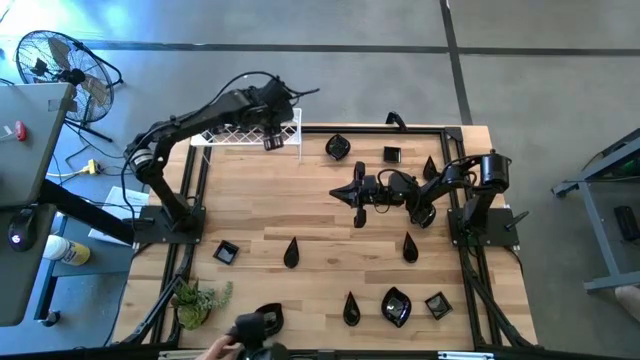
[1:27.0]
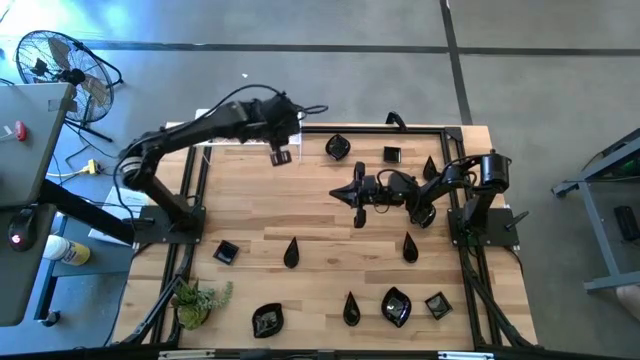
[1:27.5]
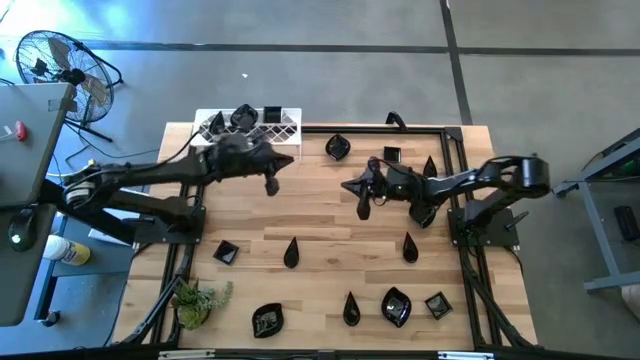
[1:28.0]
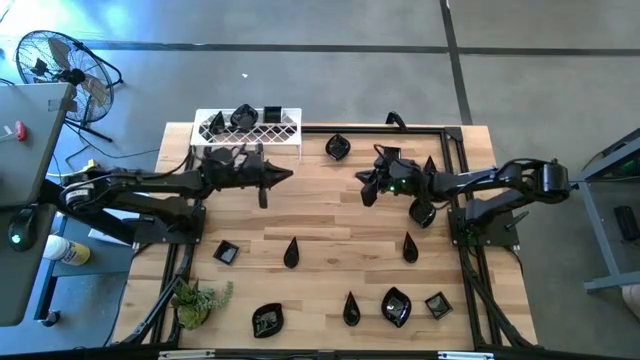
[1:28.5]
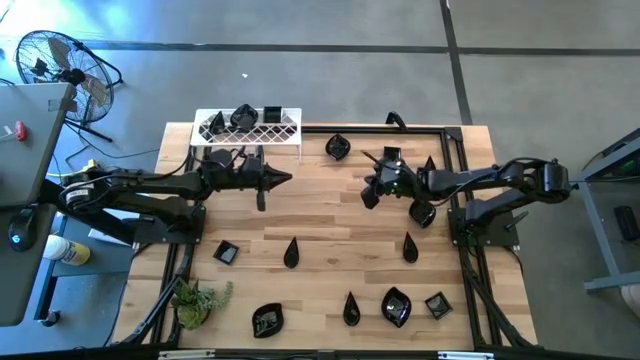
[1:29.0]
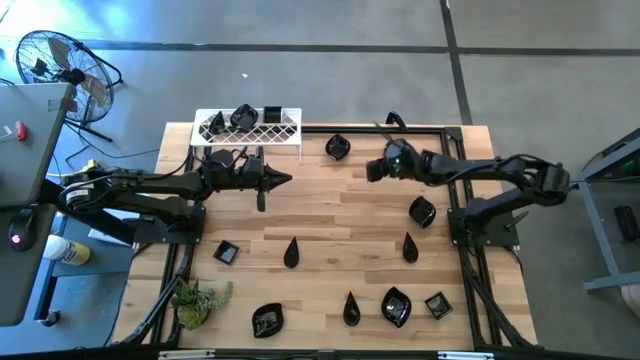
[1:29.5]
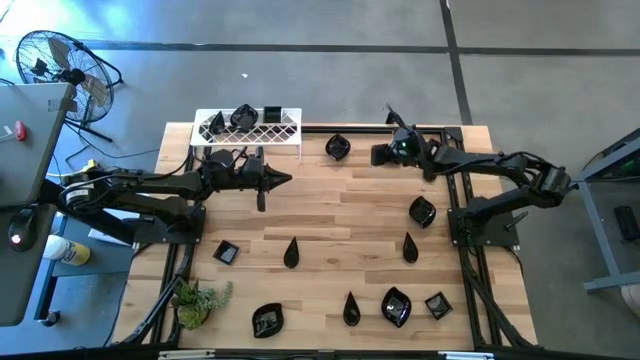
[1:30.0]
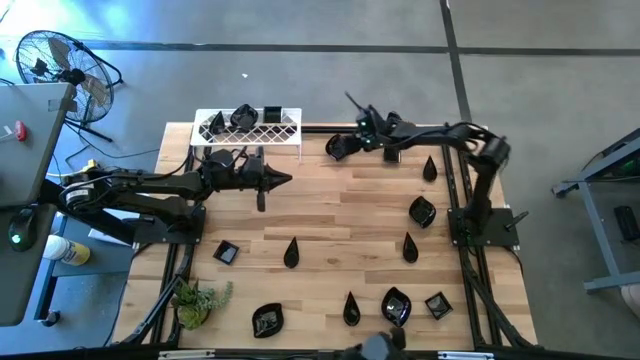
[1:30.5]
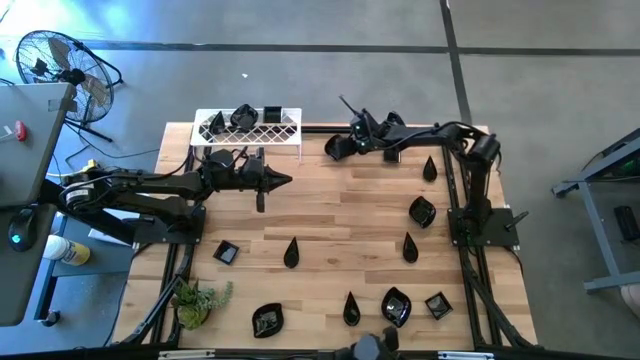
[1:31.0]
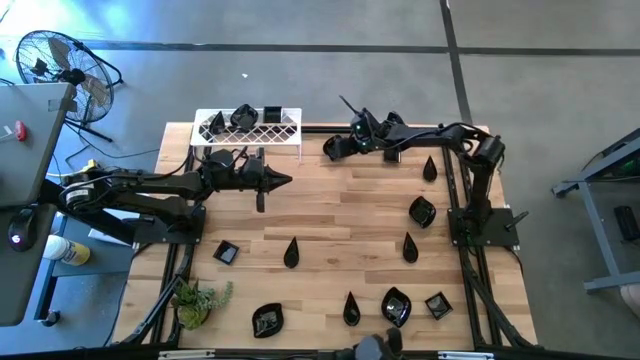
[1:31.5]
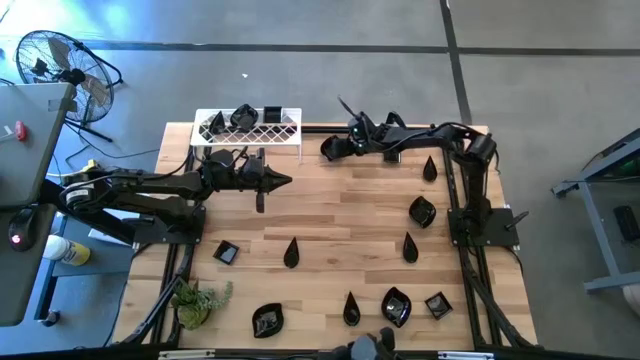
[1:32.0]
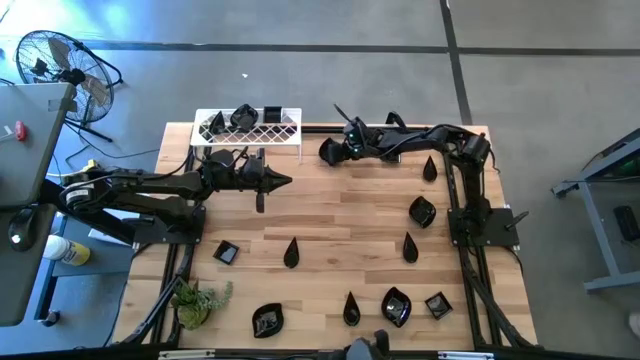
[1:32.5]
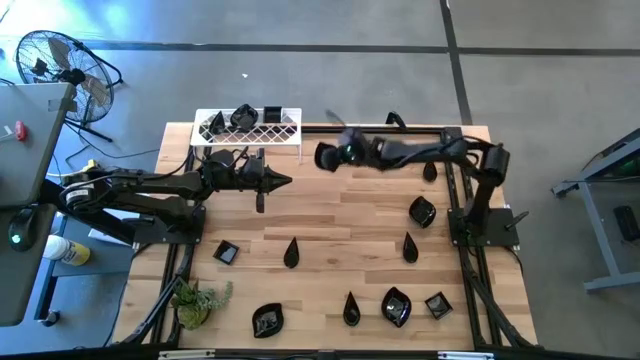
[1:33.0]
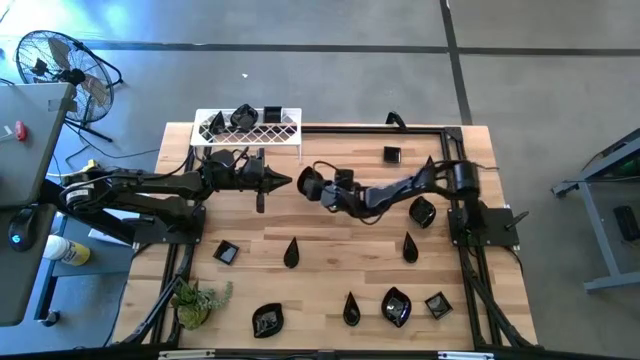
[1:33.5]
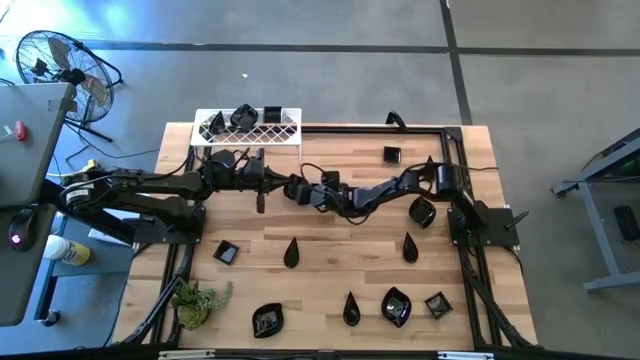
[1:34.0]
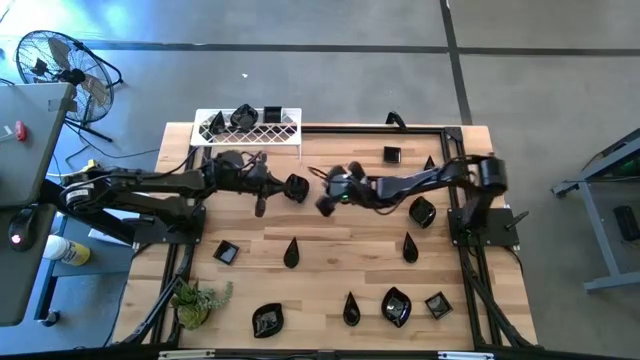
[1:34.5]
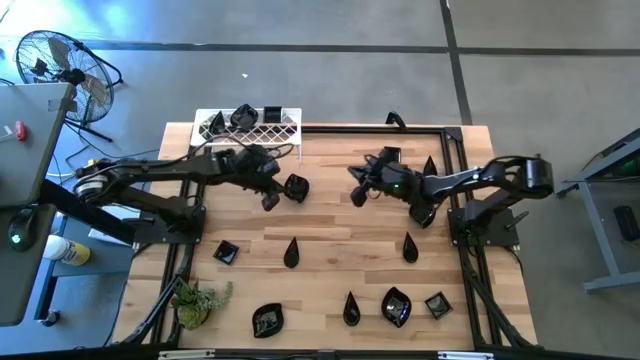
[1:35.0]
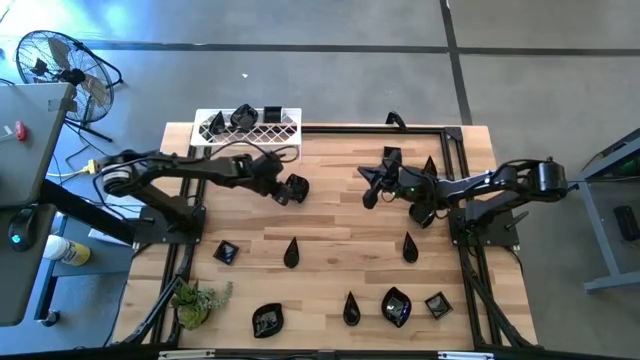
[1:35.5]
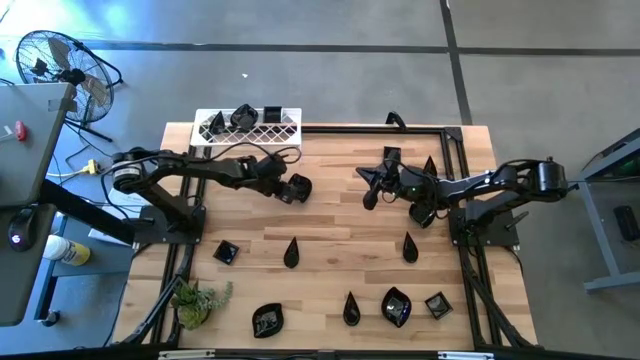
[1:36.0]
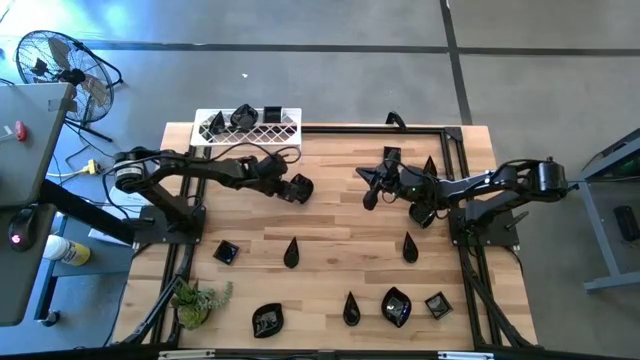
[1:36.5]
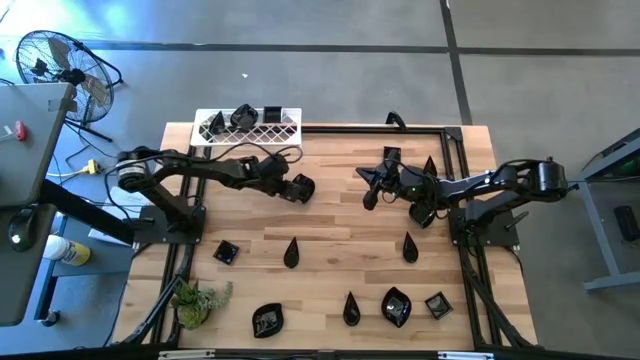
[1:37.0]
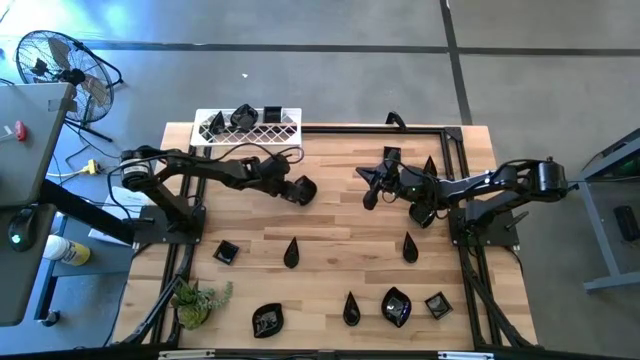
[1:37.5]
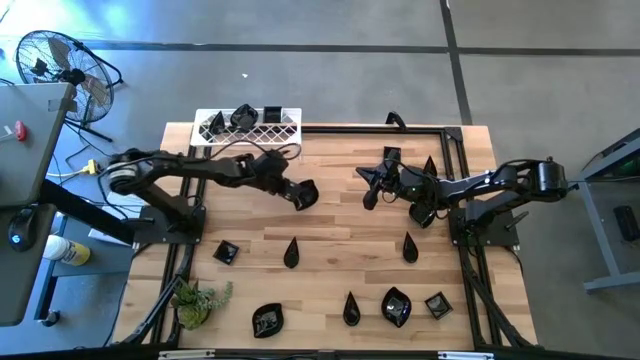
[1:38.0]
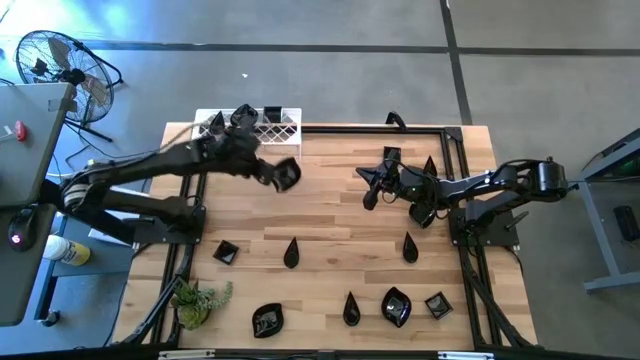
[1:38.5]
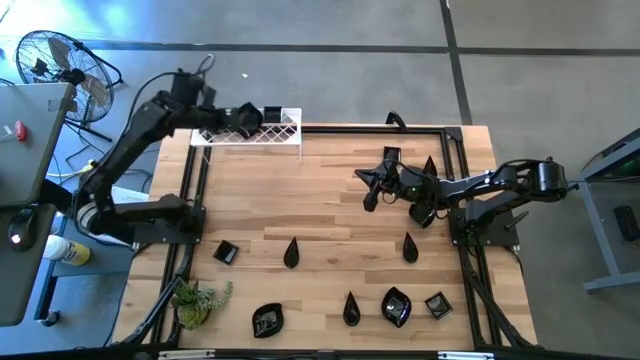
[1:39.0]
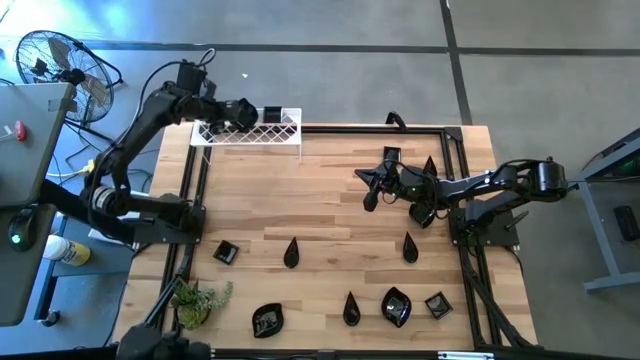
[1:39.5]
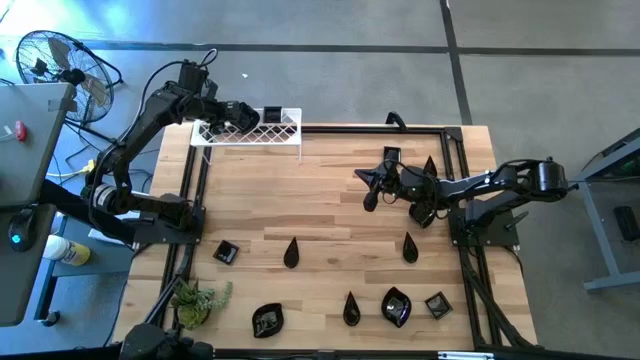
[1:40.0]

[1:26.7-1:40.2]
Task: Pick & Place Mini shaped plates
Stack the leaf-shaped plate on top of the leaf-shaped plate on the shelf

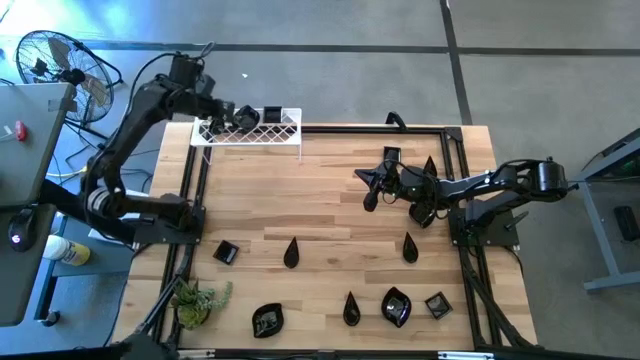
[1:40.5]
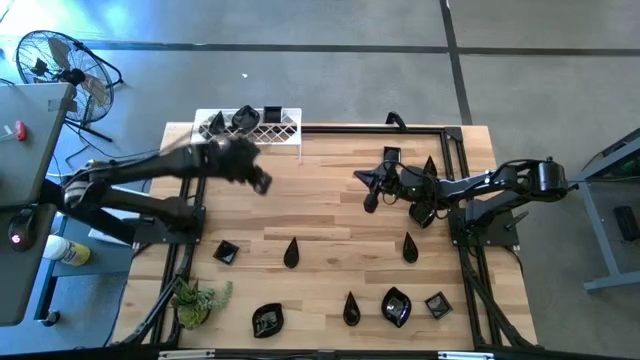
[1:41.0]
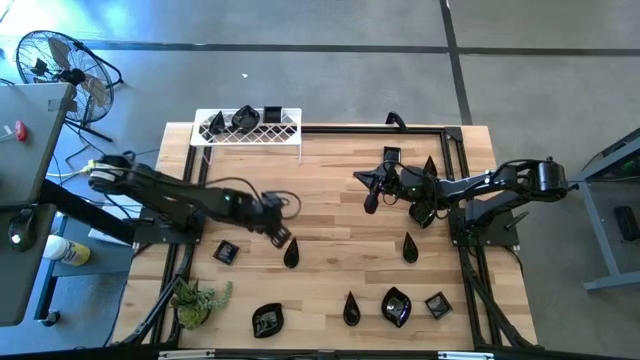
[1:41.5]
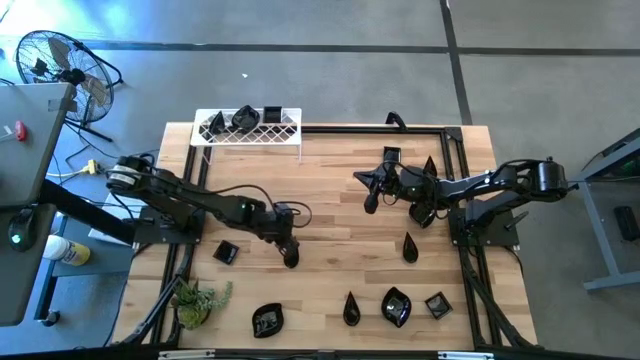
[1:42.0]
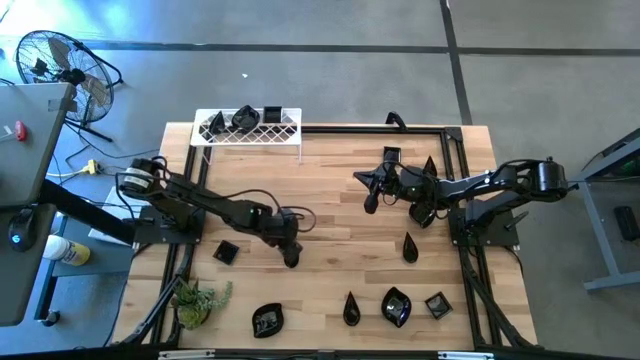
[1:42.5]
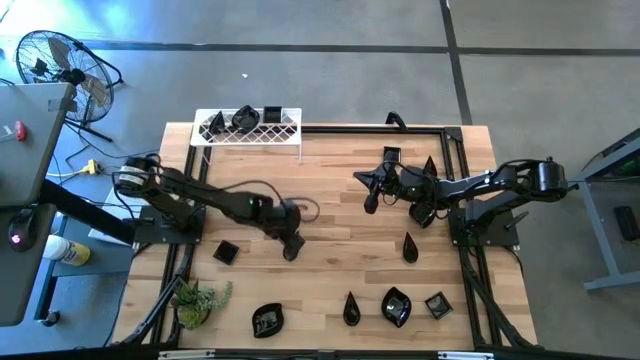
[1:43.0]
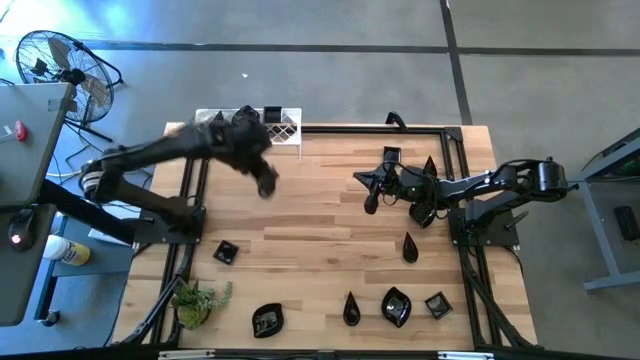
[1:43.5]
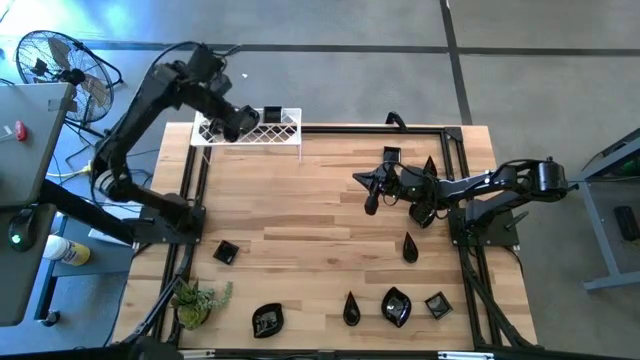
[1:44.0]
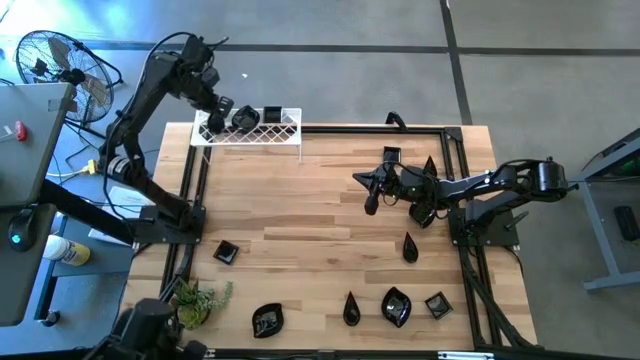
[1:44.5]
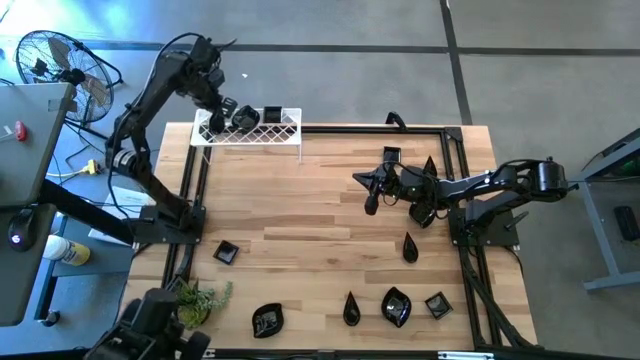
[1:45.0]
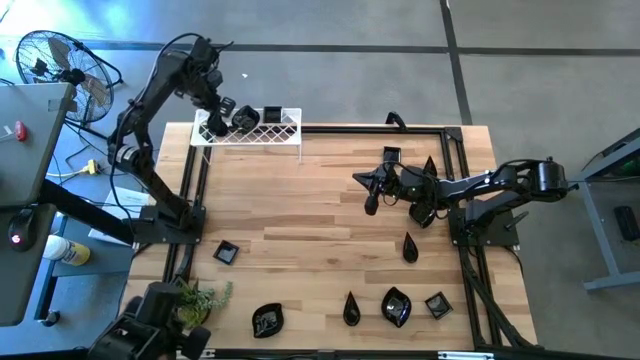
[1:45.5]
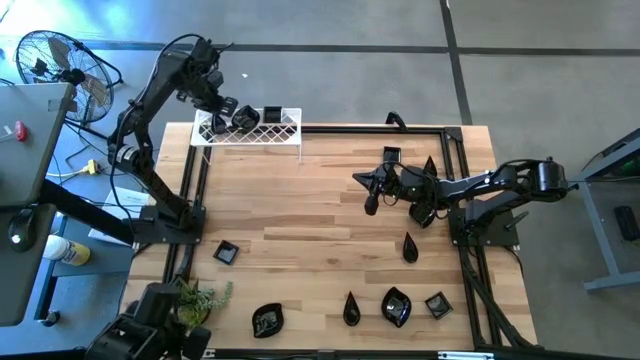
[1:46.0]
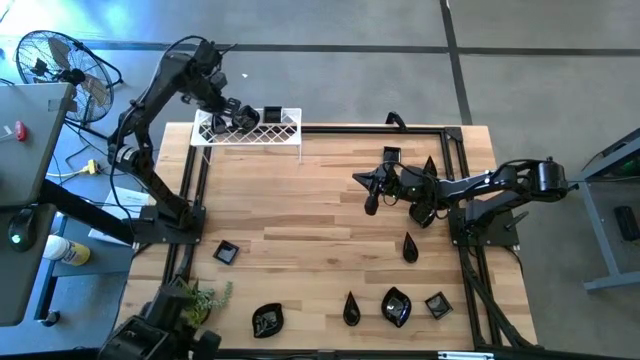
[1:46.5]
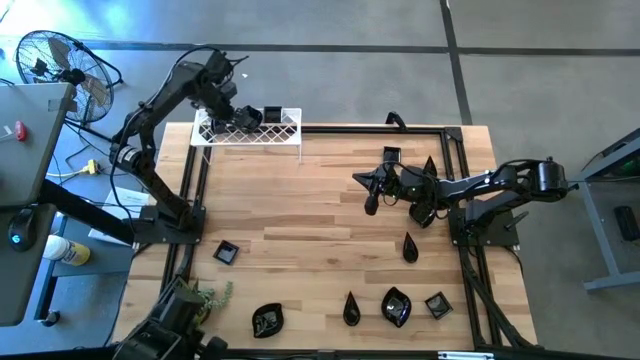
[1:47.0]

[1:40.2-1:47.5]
Stack the drop-shaped plate on top of the drop-shaped plate on the shelf

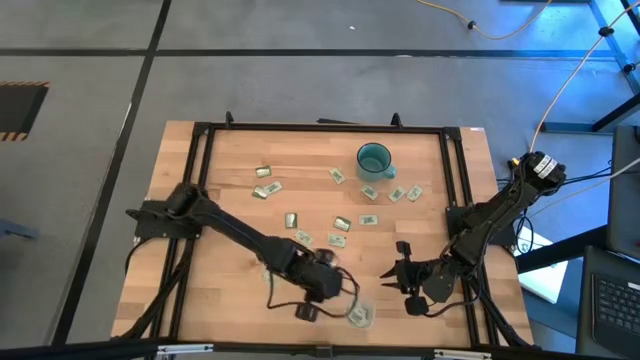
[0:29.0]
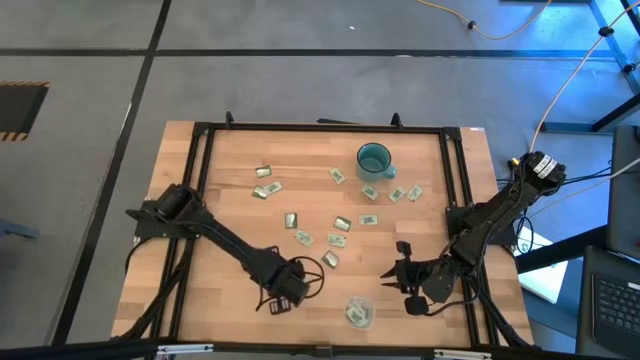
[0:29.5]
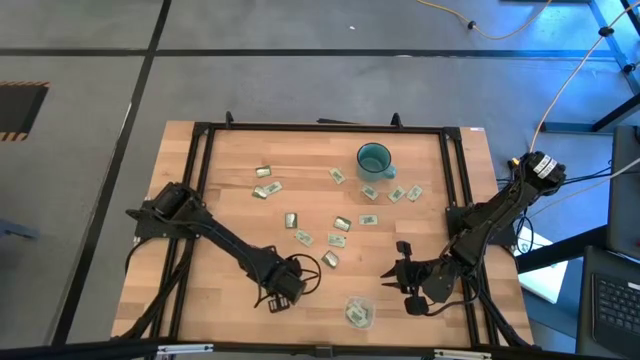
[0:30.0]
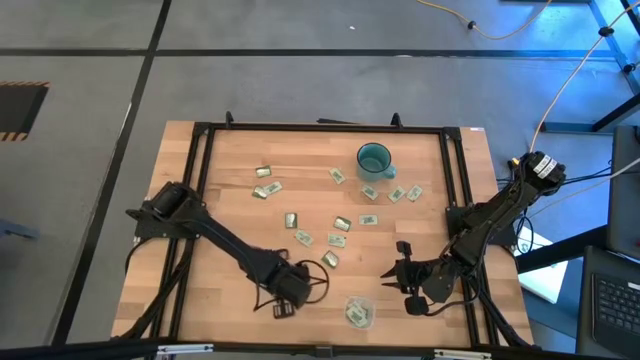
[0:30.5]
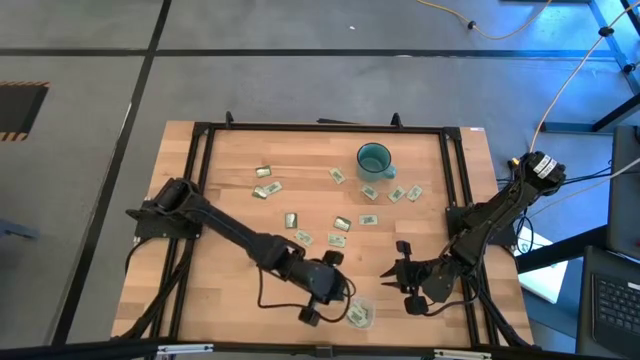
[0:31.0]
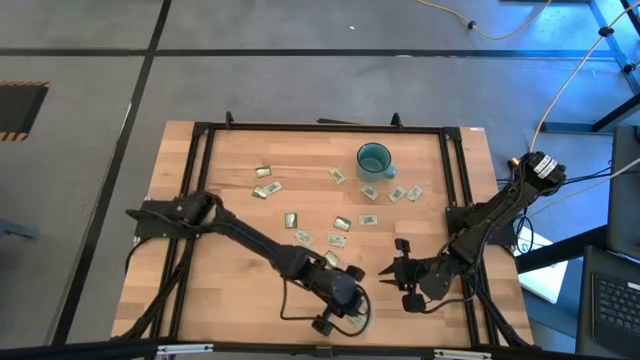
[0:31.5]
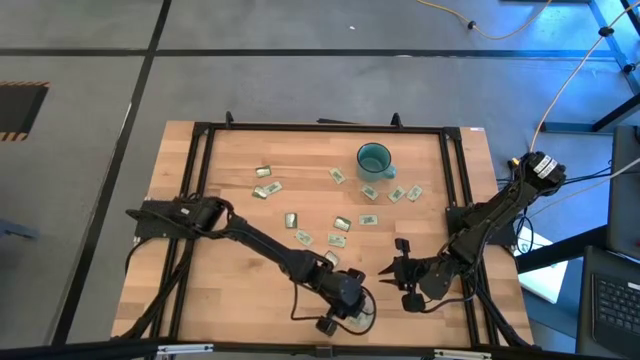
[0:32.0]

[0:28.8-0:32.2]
Task: Pick and place items into bin
Put the light green stevia packet into the transparent bin
